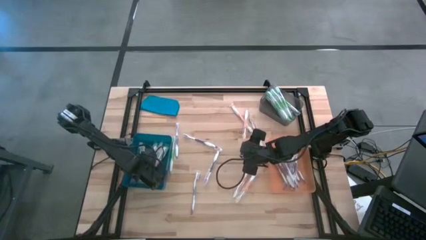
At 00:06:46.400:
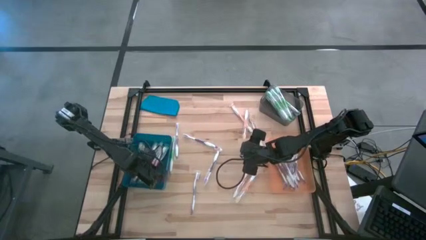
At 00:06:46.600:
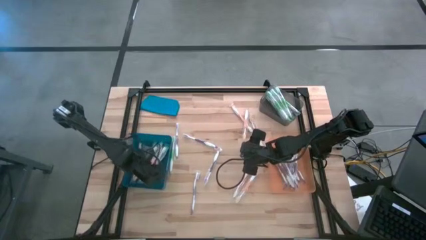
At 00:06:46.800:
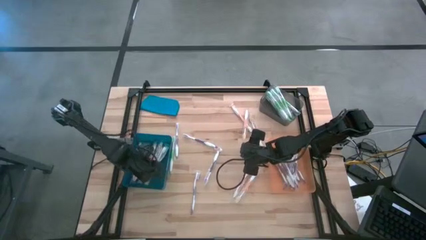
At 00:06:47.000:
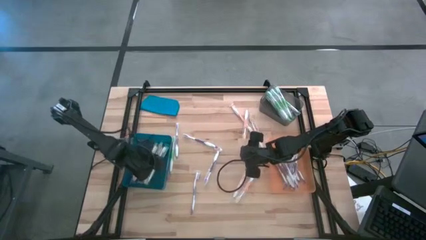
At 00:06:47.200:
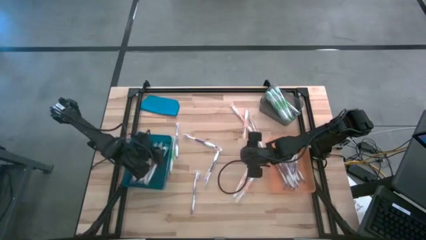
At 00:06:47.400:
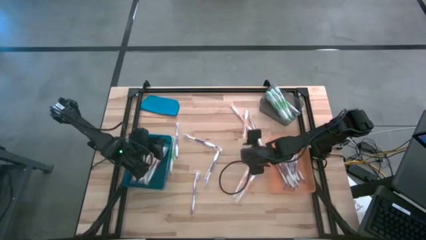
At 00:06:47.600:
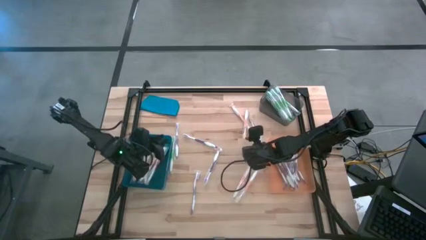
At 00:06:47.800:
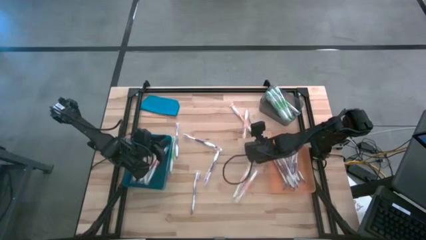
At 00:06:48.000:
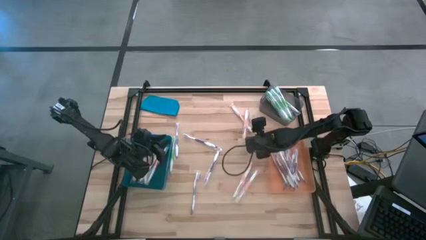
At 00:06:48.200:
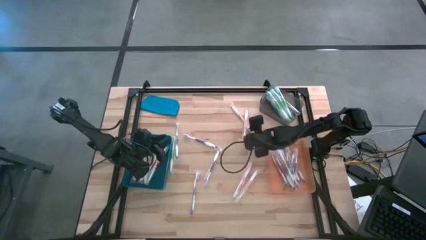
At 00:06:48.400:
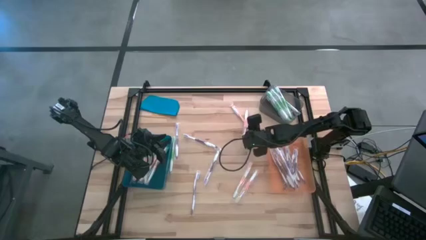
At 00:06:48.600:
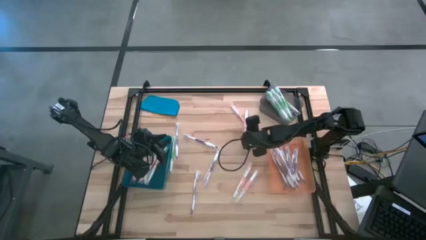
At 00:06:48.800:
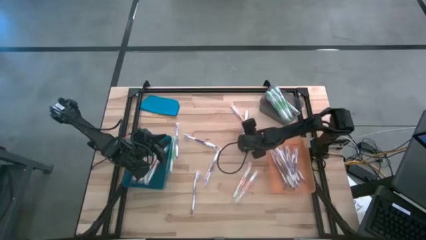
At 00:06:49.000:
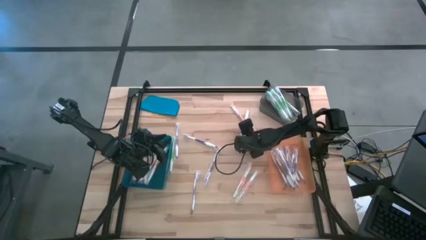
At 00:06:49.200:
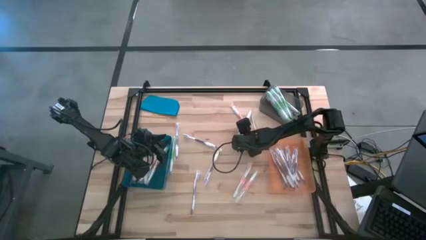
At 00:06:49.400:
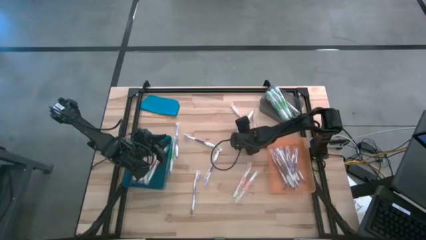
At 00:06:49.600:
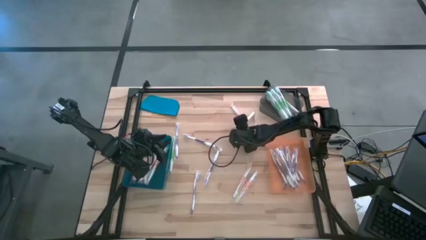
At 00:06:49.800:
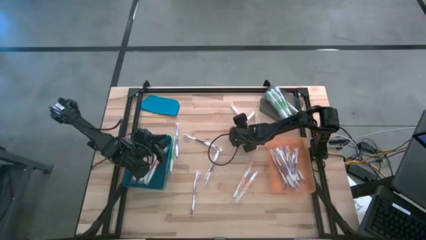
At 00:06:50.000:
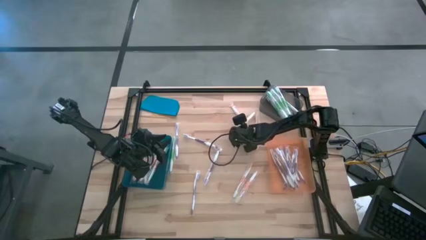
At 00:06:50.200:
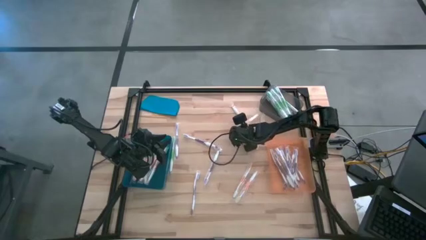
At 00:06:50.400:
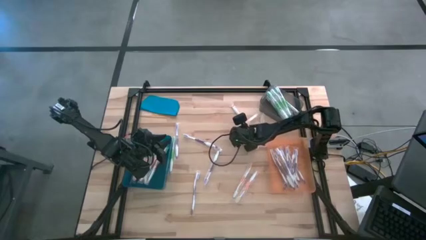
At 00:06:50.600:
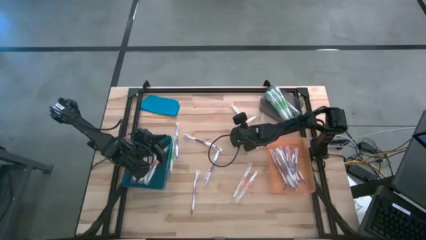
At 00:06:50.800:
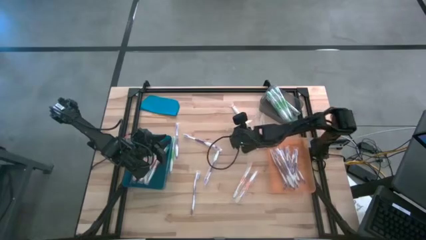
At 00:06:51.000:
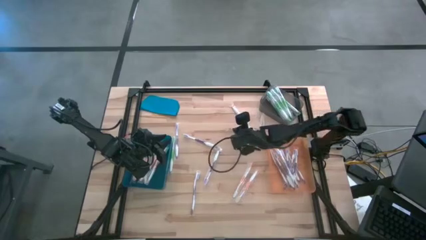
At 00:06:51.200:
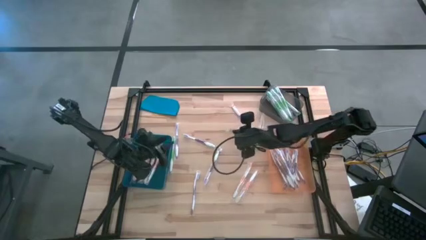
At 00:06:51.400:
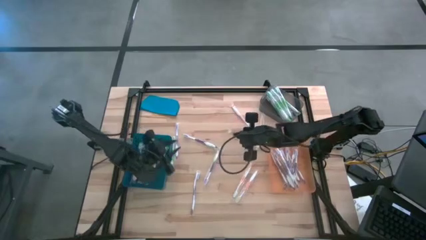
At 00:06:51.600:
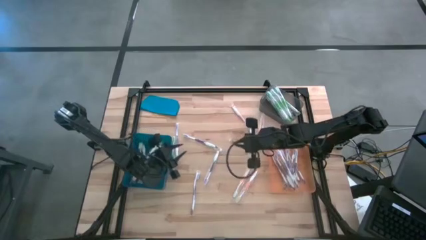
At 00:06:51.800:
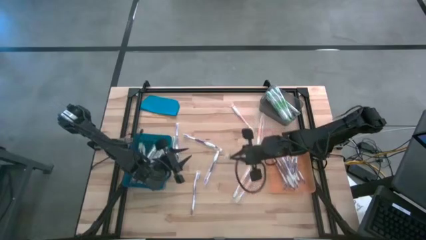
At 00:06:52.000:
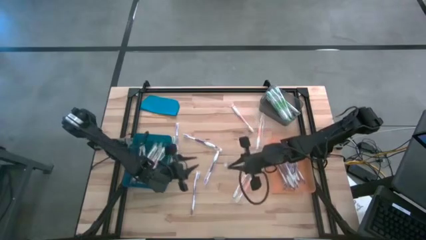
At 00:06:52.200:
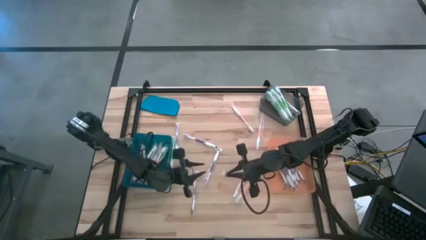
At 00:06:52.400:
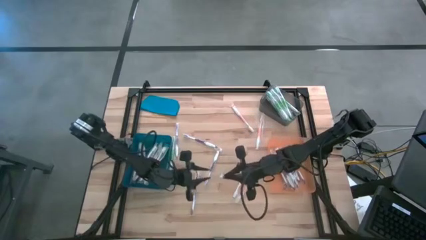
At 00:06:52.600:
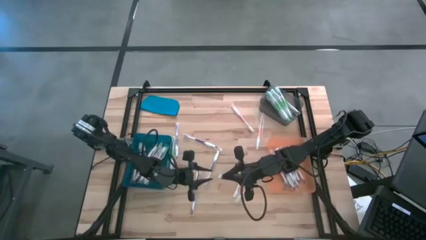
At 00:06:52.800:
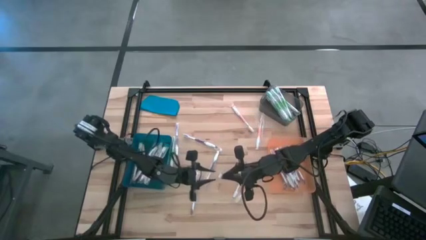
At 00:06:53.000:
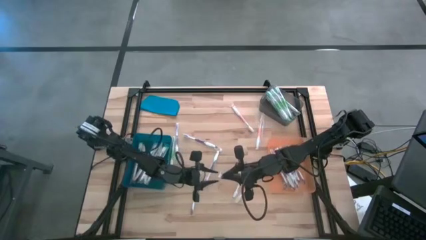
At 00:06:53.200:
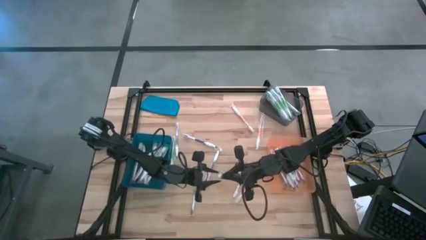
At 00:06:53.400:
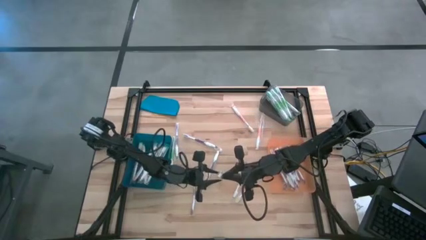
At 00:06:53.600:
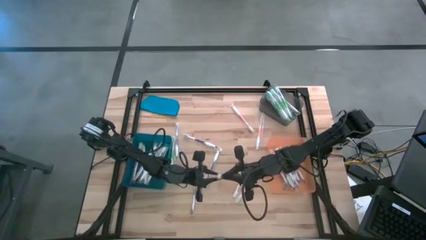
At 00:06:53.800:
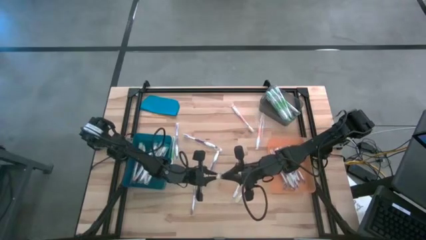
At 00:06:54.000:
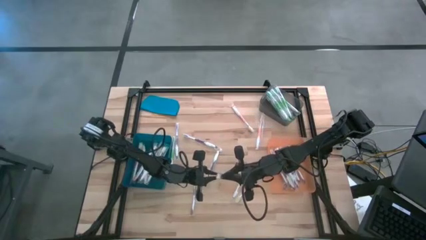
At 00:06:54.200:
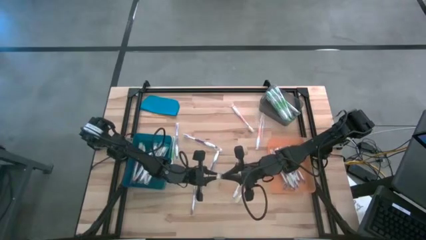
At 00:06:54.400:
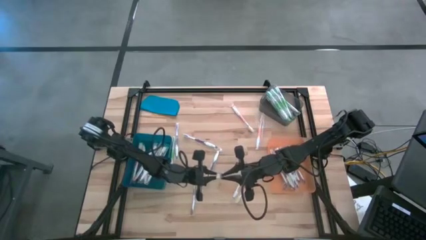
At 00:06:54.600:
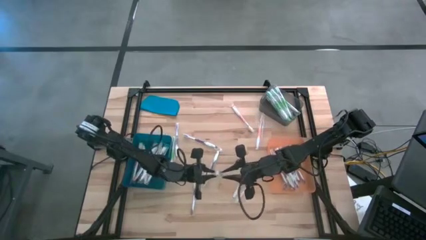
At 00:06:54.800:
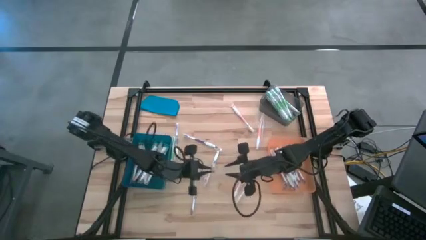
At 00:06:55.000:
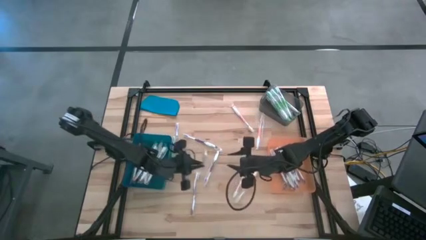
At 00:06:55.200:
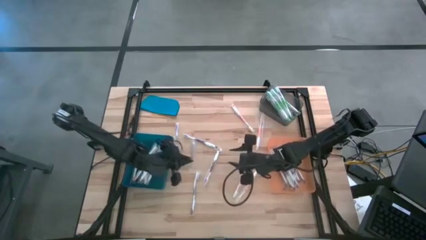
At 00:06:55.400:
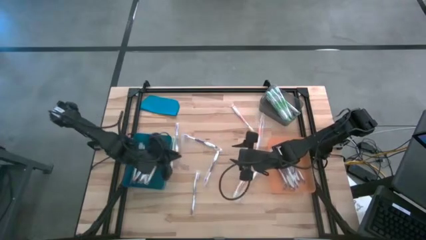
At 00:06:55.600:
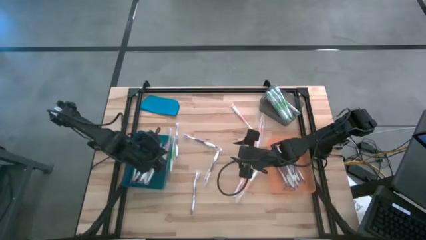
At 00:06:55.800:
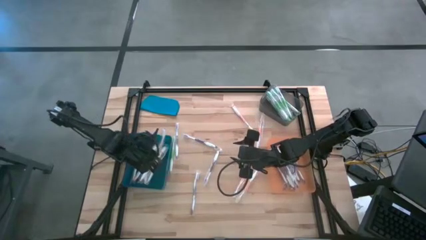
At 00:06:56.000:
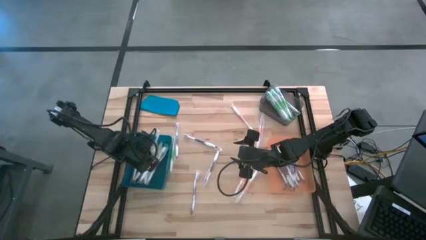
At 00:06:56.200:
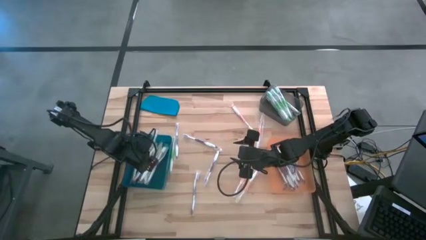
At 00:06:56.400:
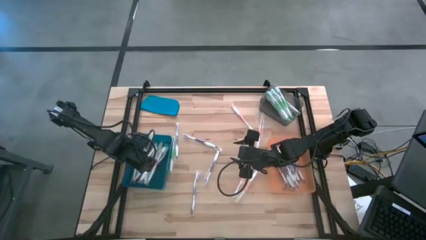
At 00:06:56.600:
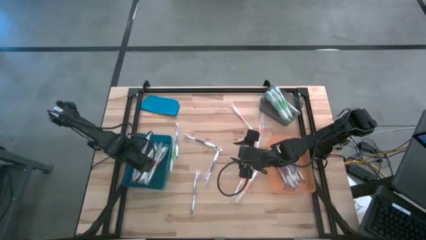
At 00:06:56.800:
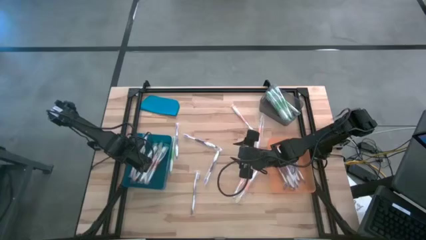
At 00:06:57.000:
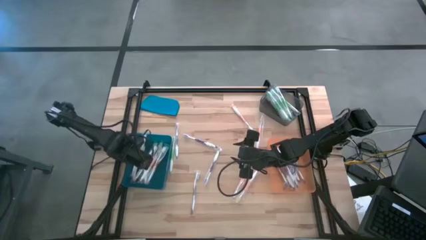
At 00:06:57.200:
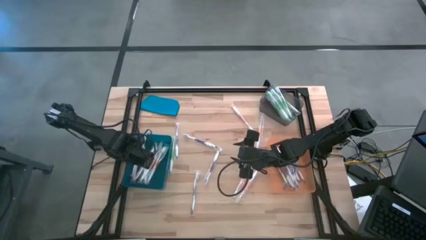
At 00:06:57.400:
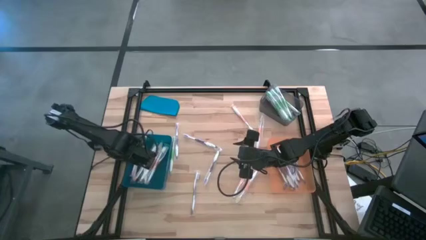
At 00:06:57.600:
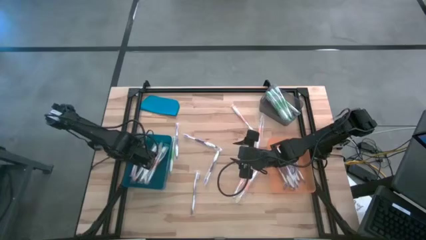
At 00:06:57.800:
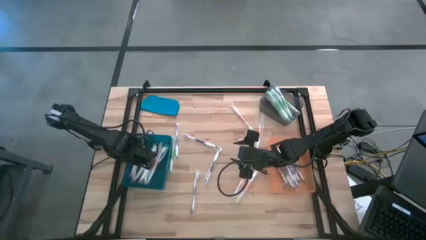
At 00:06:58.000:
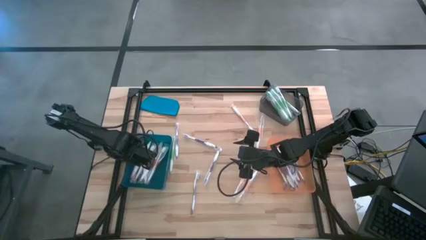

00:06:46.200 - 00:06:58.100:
Task: Pick & Place Toothbrushes
Put the orange toothbrush into the blue bin
